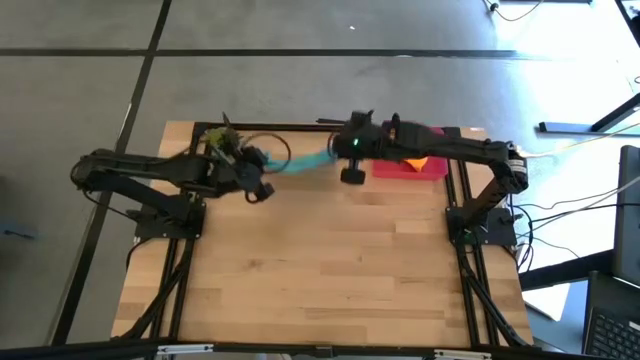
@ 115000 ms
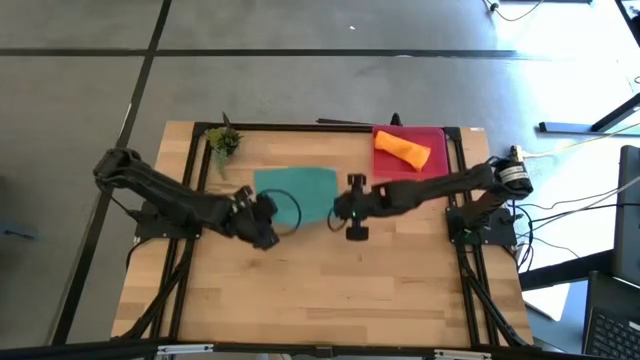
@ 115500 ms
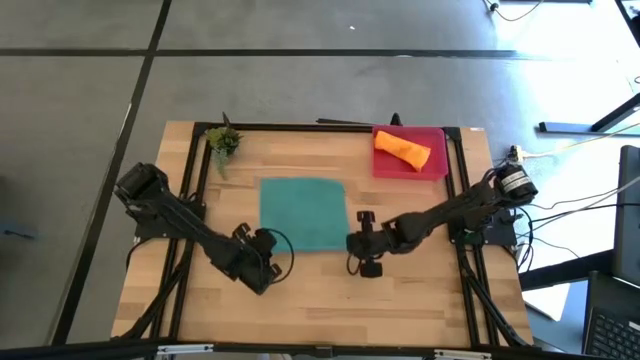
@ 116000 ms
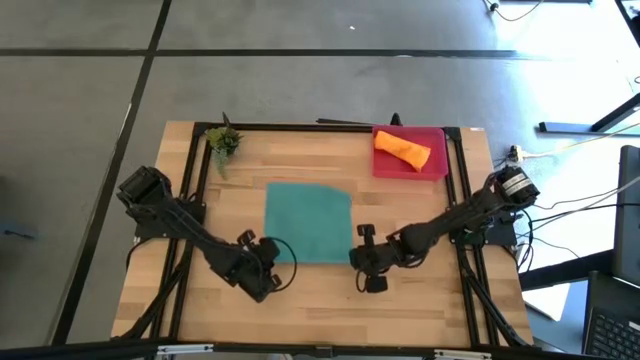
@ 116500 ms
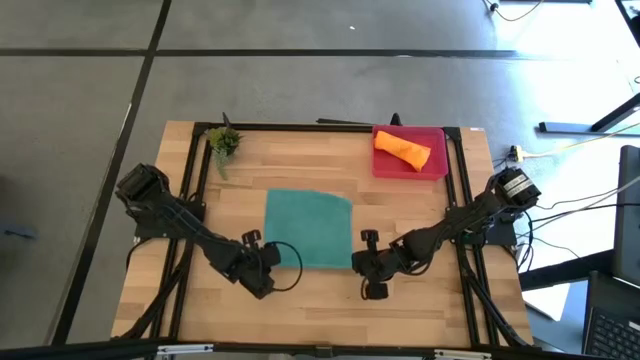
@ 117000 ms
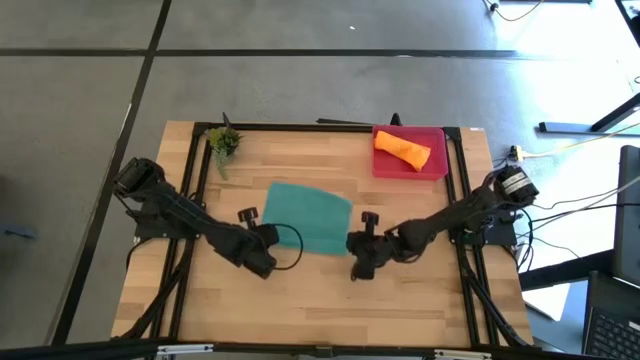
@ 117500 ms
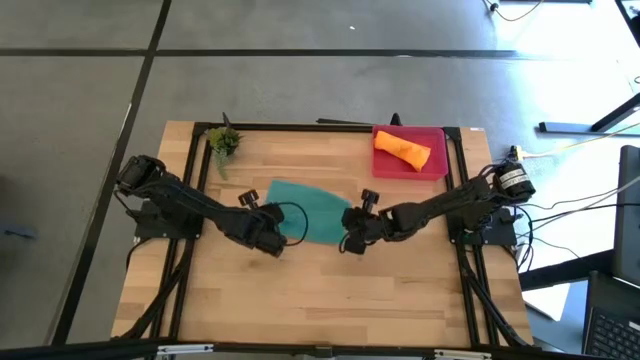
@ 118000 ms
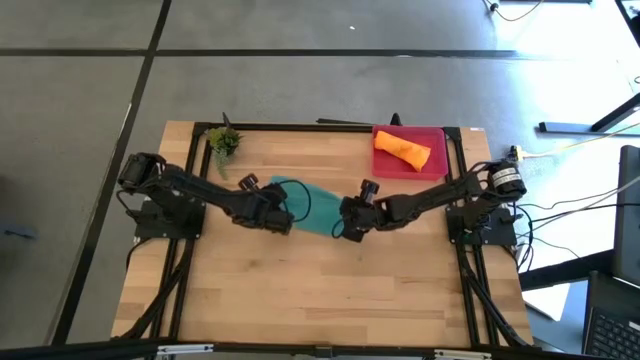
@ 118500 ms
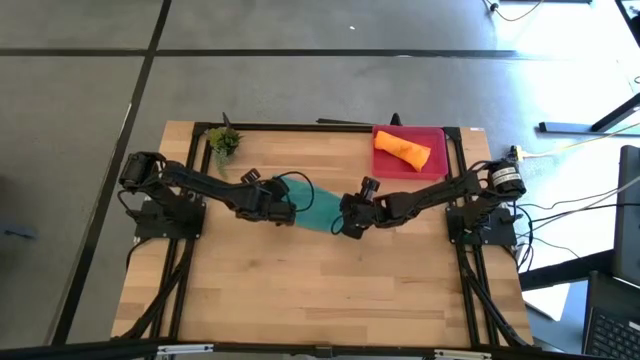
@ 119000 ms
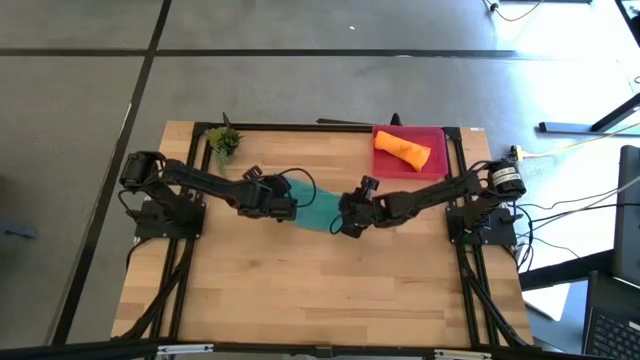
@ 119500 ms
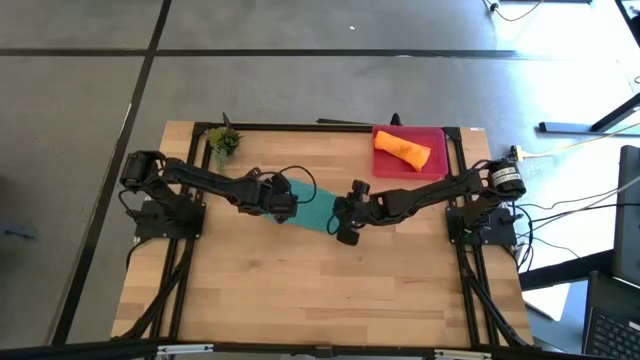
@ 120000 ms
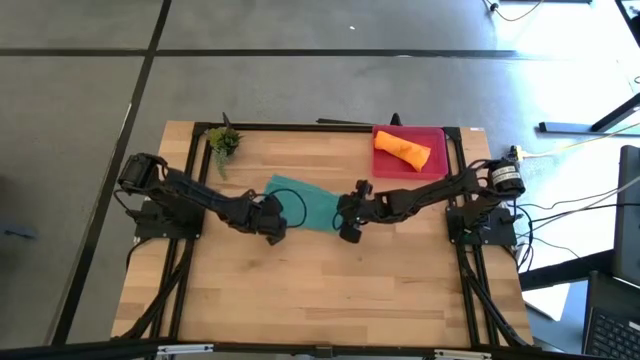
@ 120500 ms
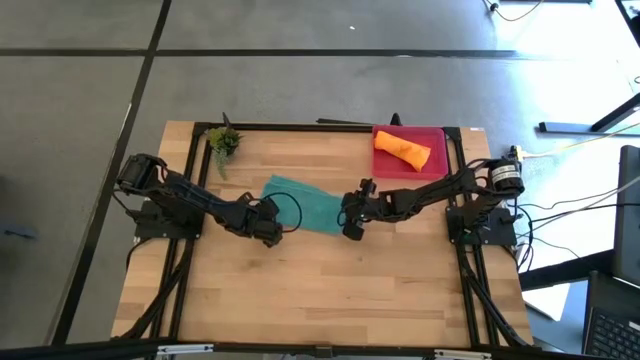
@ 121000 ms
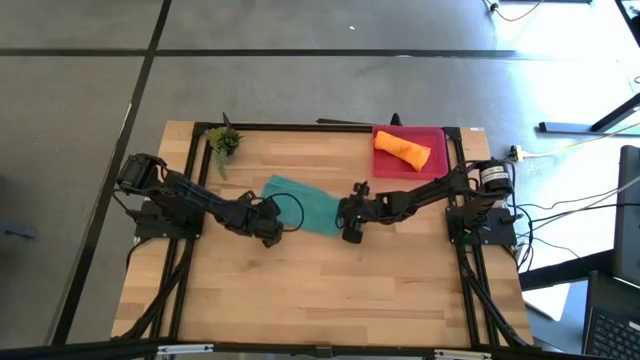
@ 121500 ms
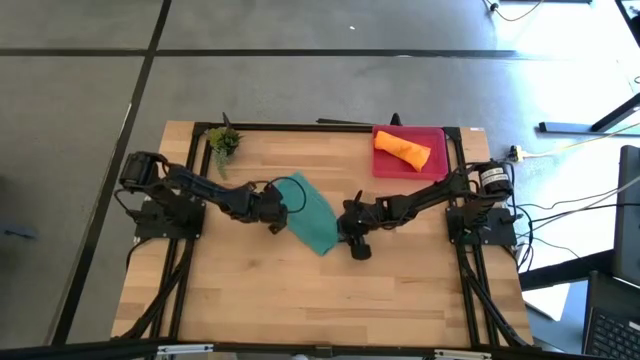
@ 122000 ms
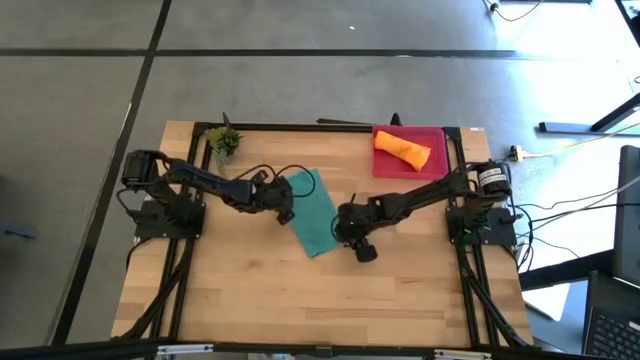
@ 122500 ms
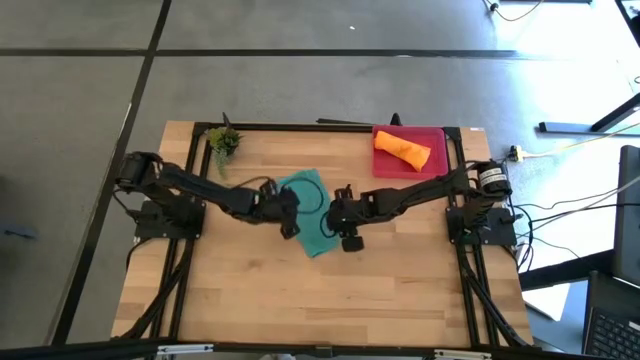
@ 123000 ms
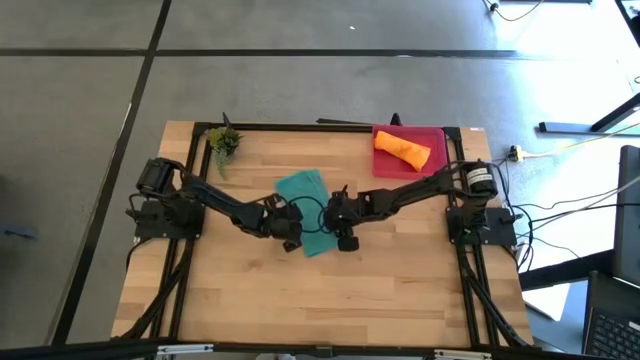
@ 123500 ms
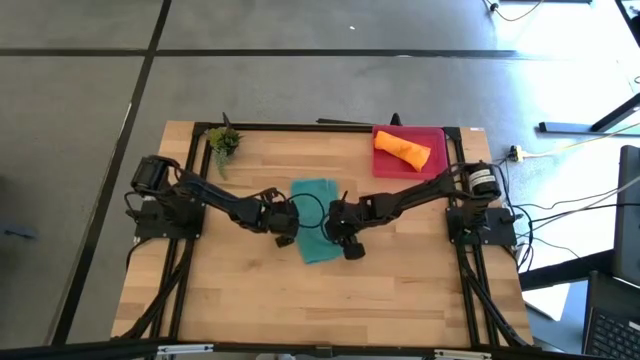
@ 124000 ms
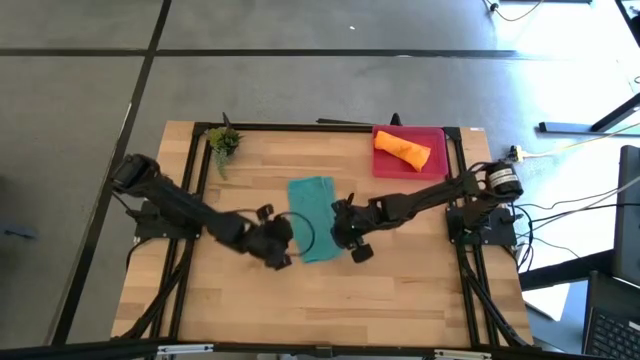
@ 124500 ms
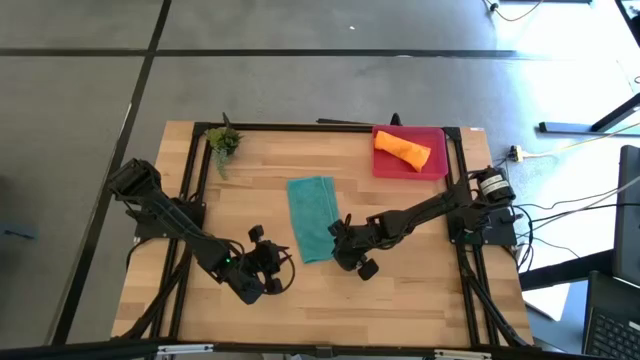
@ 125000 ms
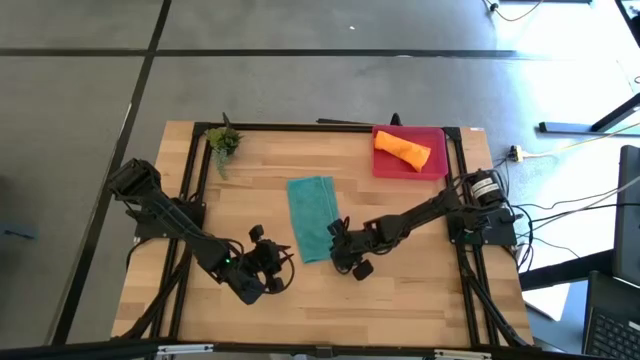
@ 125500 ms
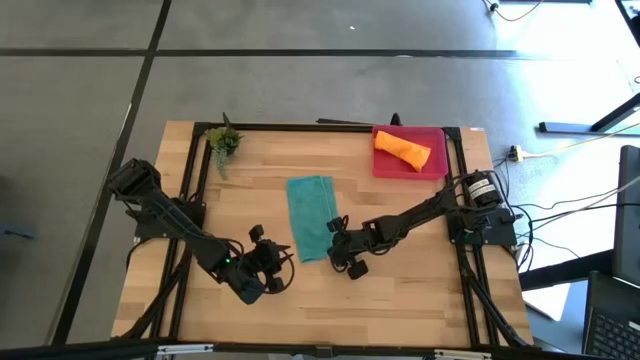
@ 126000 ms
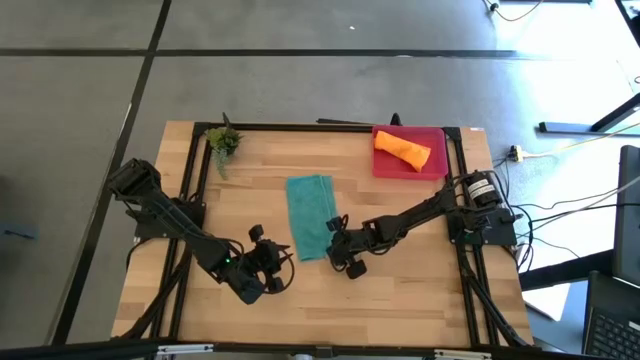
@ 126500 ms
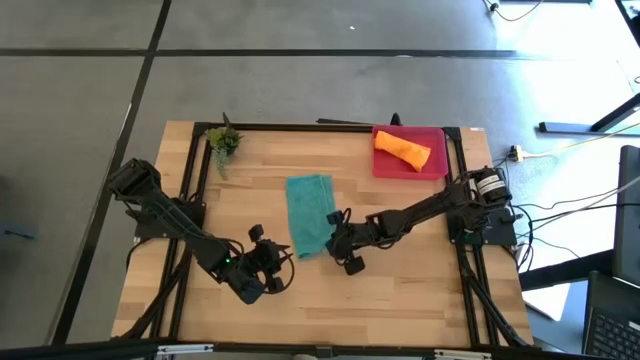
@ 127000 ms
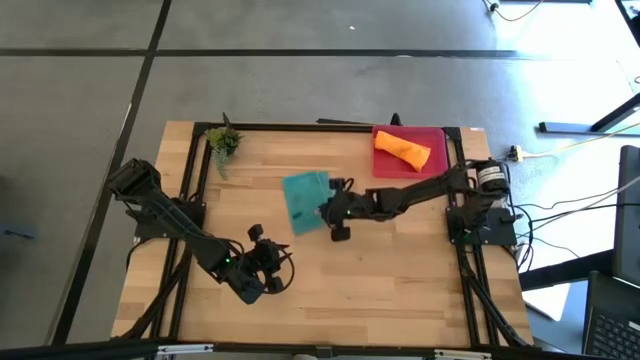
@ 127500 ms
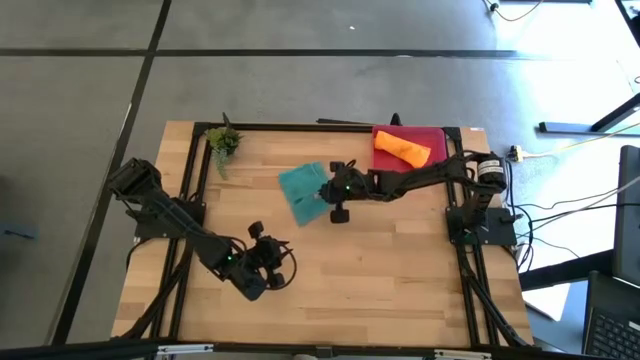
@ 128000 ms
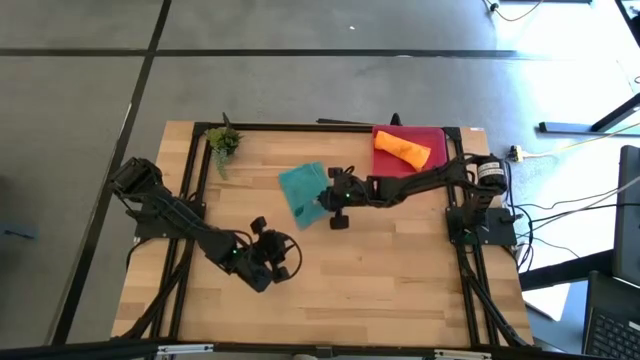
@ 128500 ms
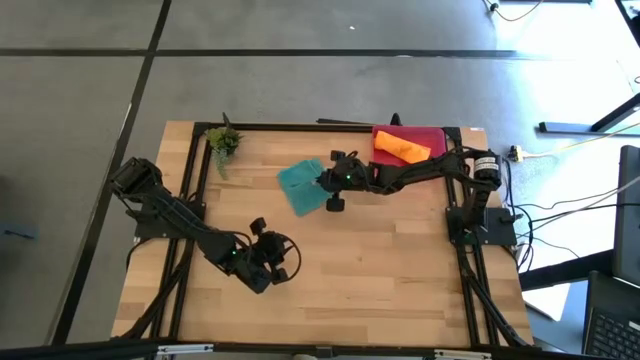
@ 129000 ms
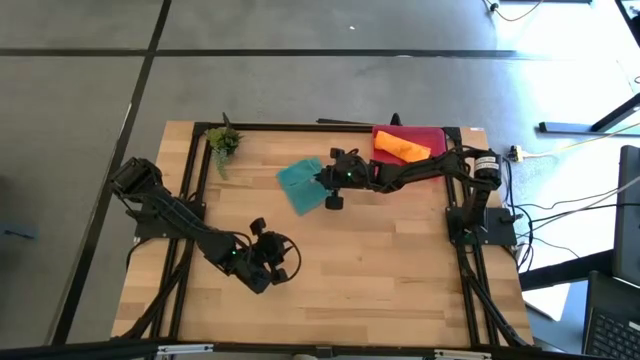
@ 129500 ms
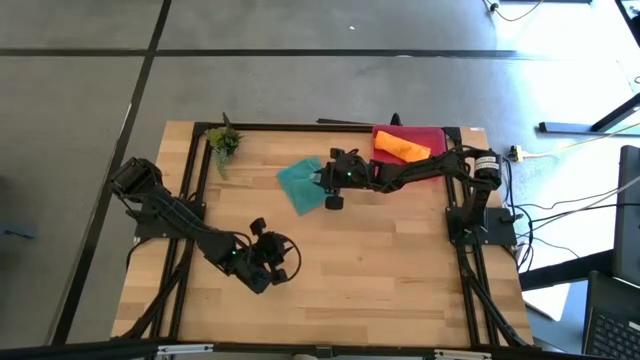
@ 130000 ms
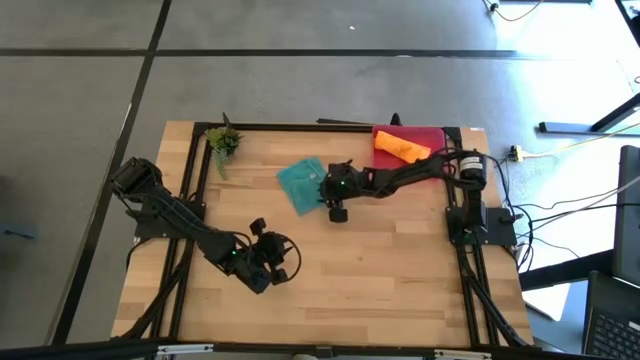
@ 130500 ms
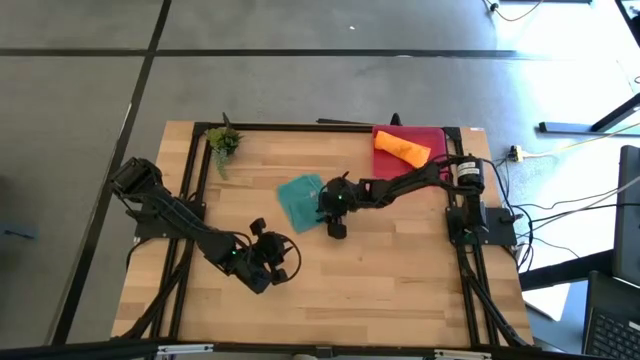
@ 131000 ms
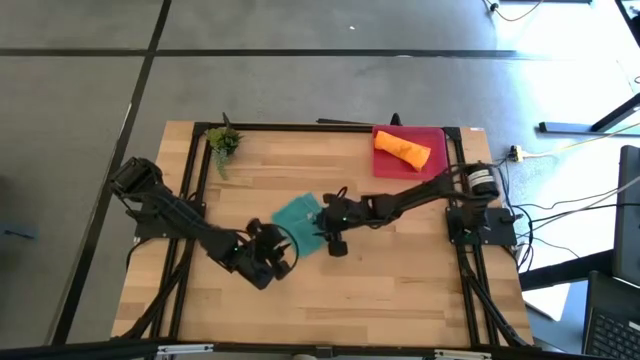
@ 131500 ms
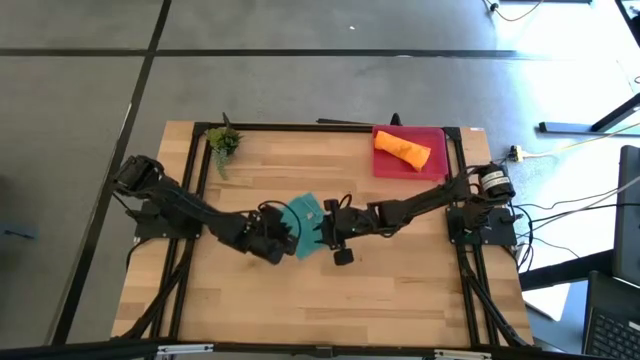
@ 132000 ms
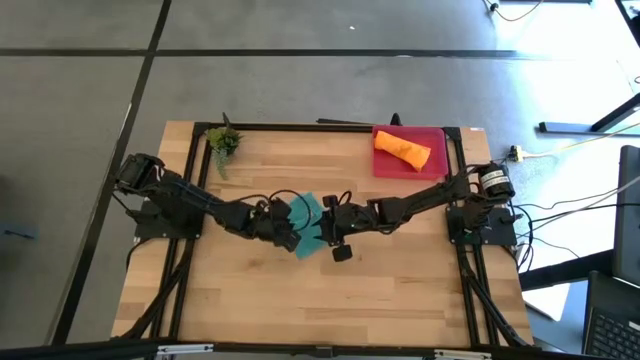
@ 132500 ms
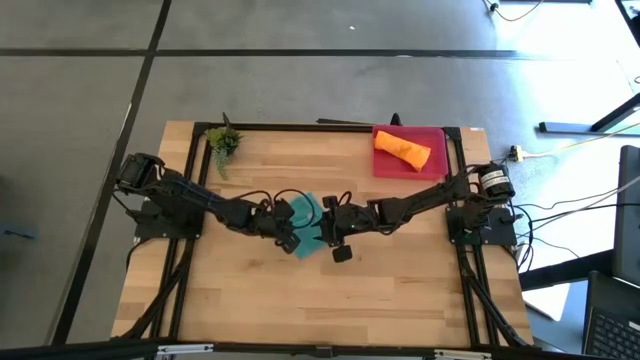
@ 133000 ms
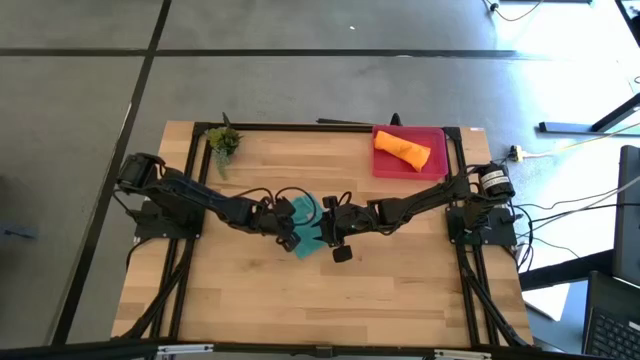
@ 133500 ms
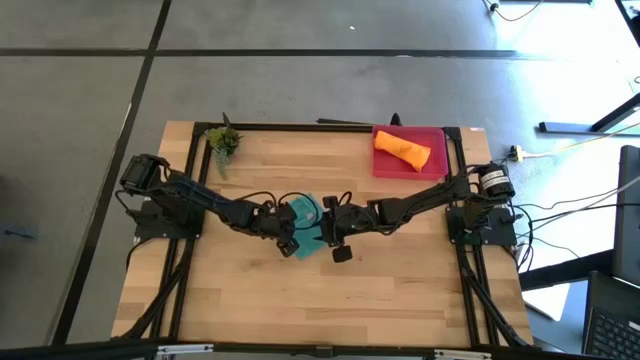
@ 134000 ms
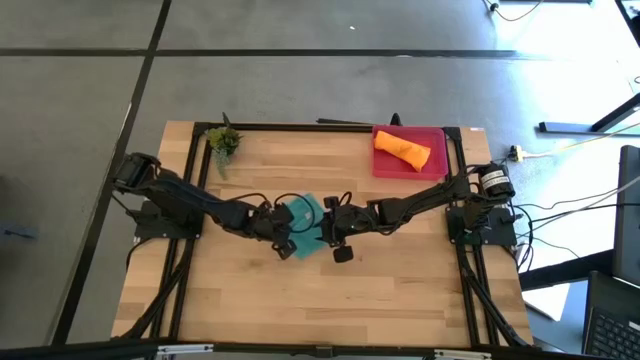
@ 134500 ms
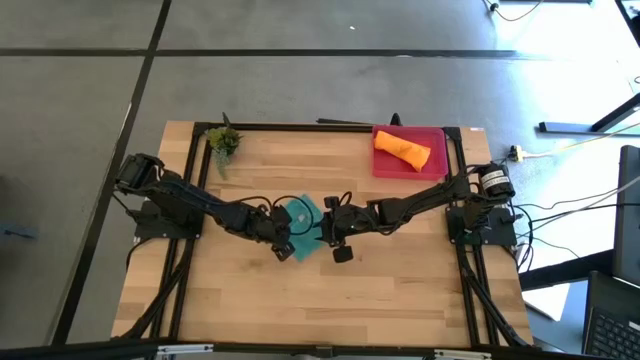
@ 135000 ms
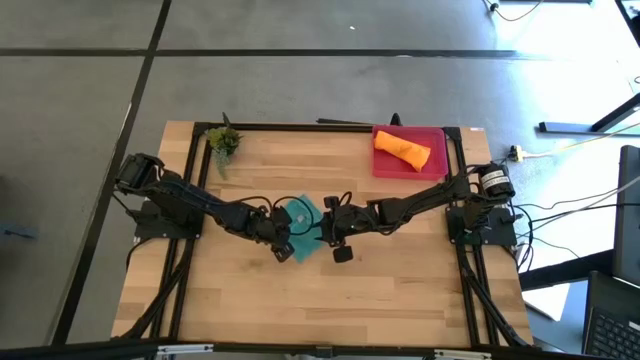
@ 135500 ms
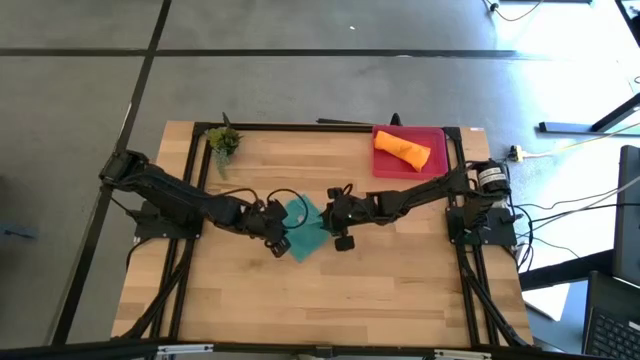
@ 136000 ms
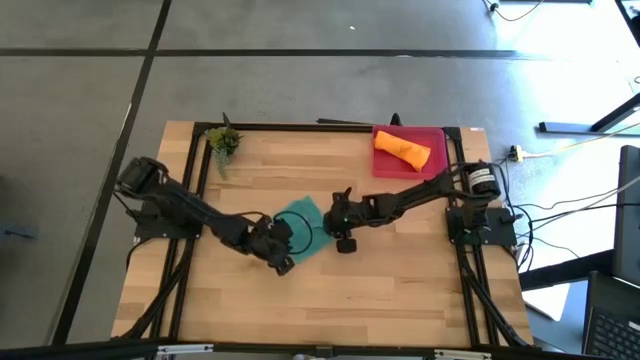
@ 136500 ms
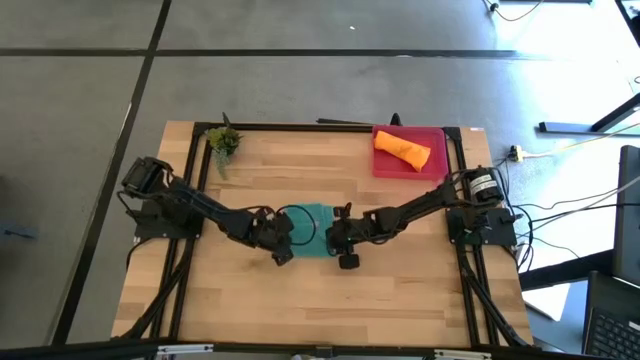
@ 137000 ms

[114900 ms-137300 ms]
Task: Roll microfiber towels into tight, uniform cylinder then place into a basket
Fold the blue microfiber towel
